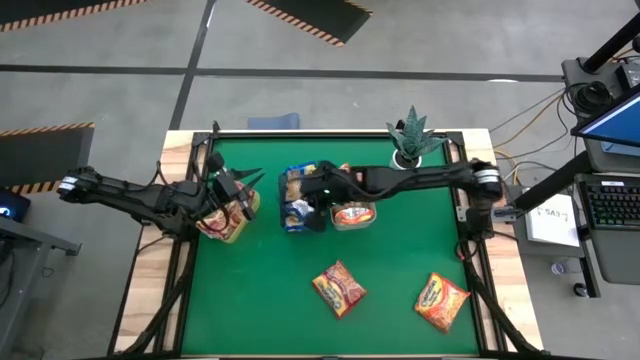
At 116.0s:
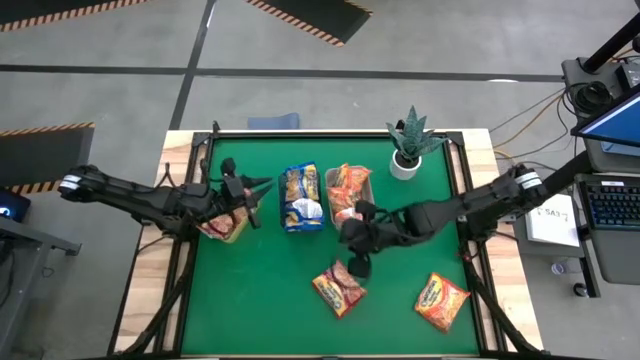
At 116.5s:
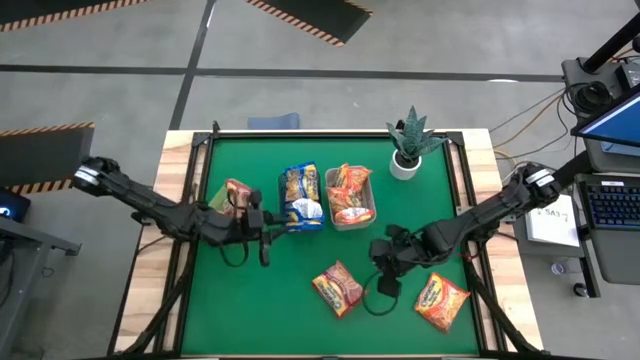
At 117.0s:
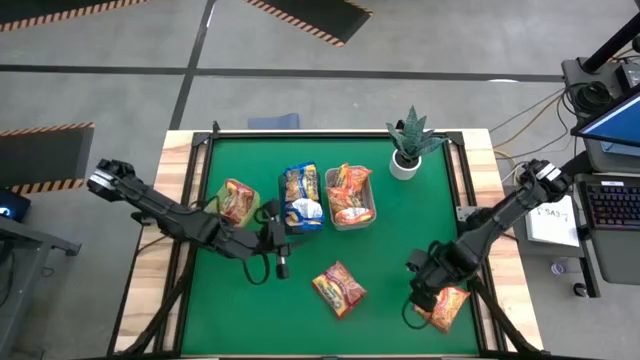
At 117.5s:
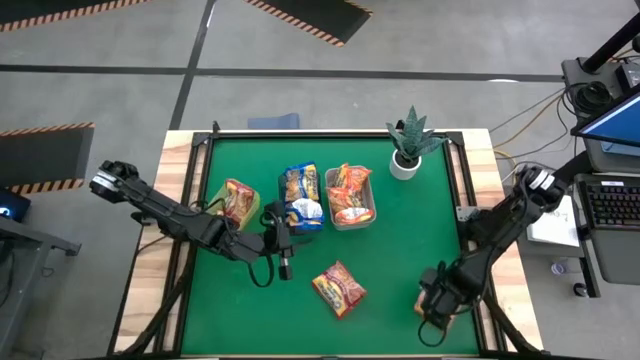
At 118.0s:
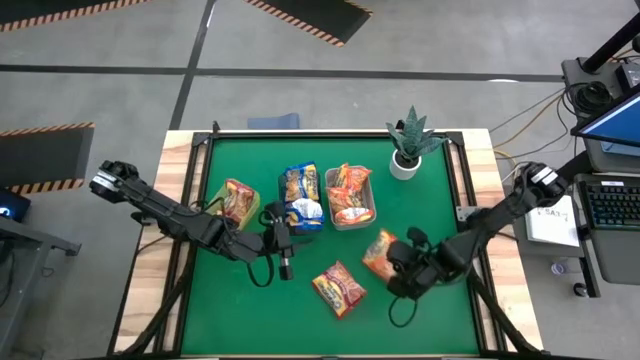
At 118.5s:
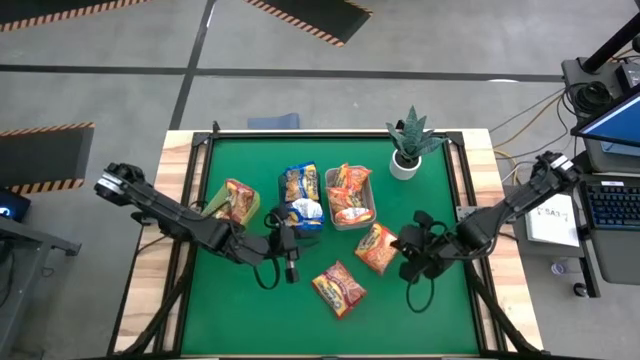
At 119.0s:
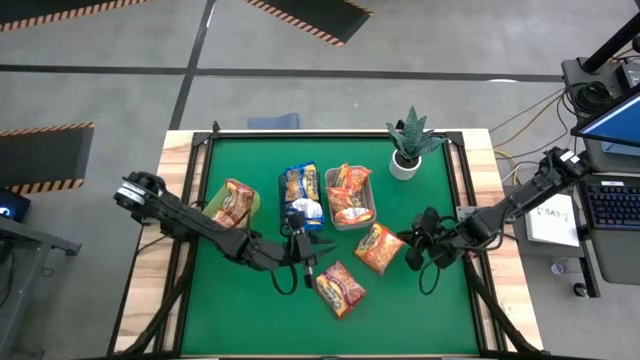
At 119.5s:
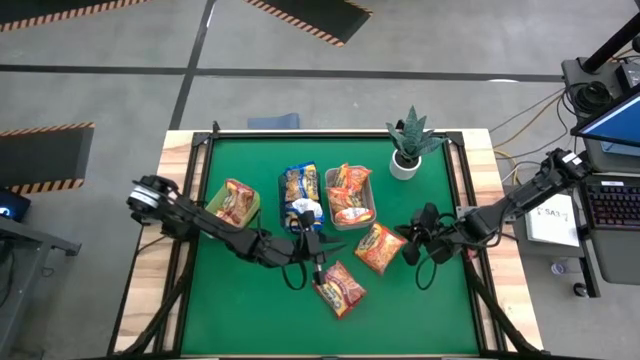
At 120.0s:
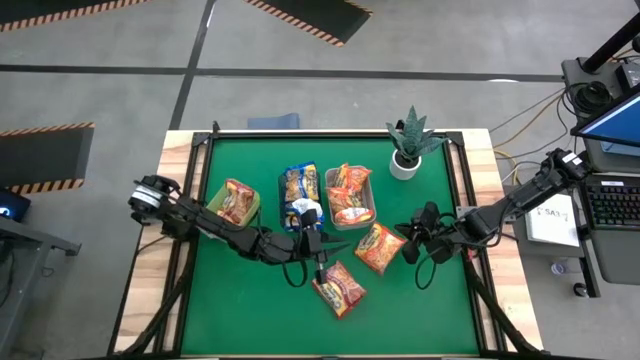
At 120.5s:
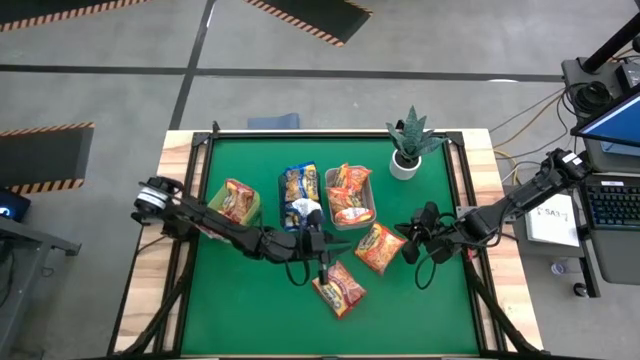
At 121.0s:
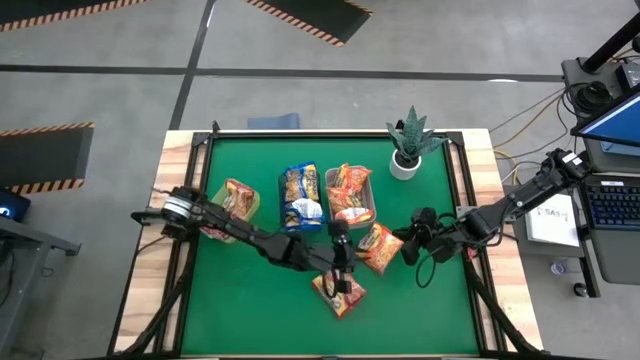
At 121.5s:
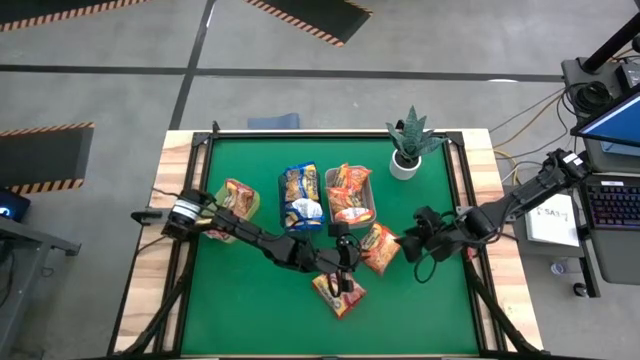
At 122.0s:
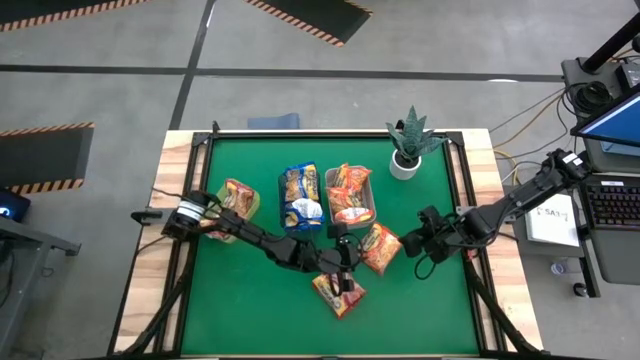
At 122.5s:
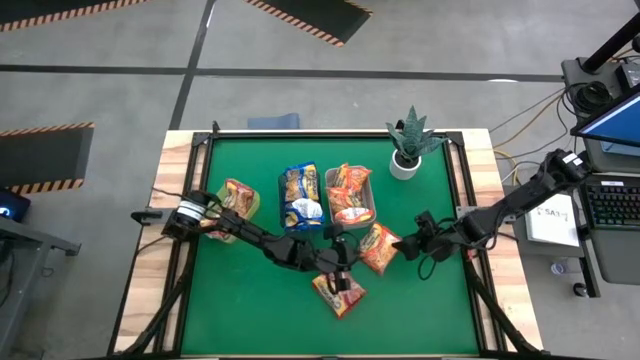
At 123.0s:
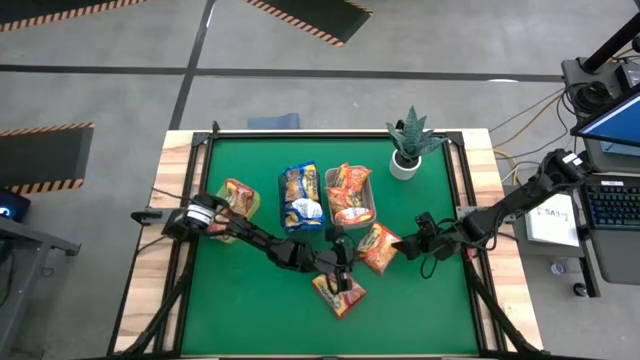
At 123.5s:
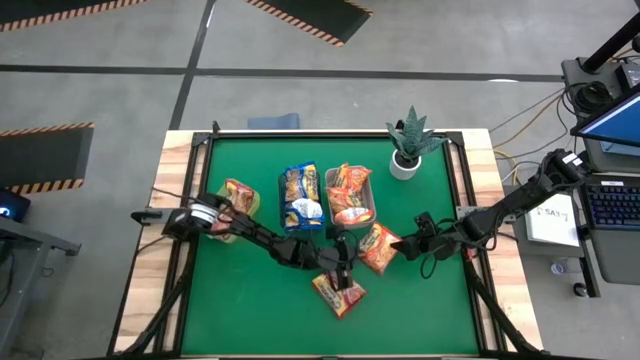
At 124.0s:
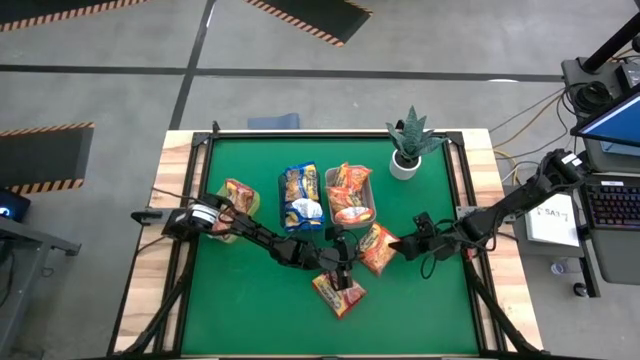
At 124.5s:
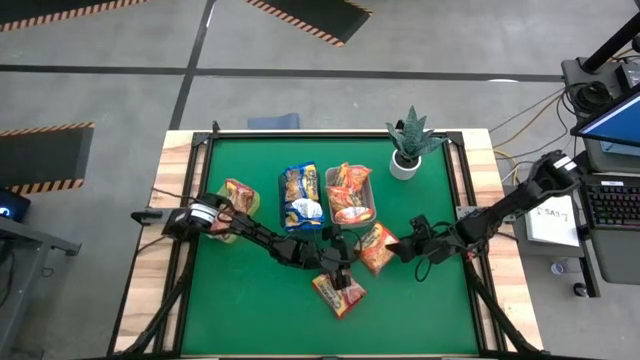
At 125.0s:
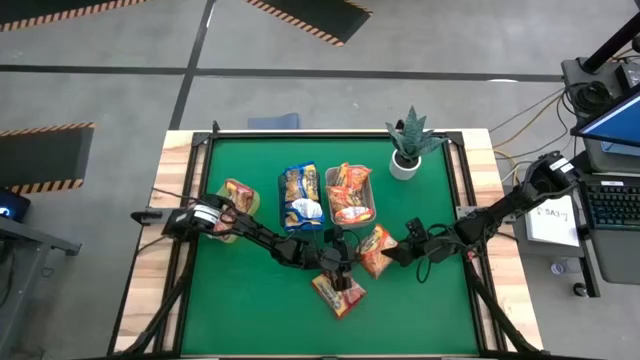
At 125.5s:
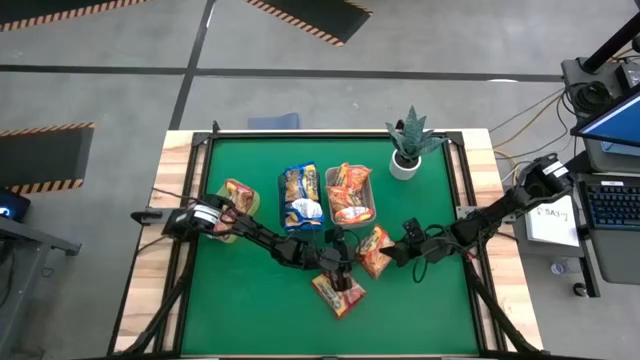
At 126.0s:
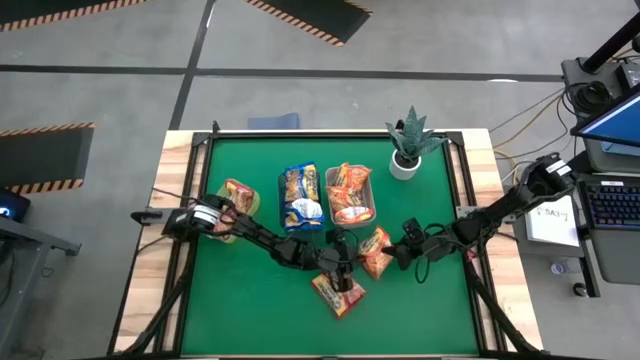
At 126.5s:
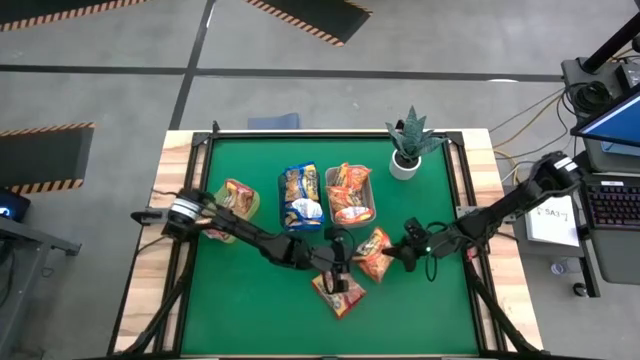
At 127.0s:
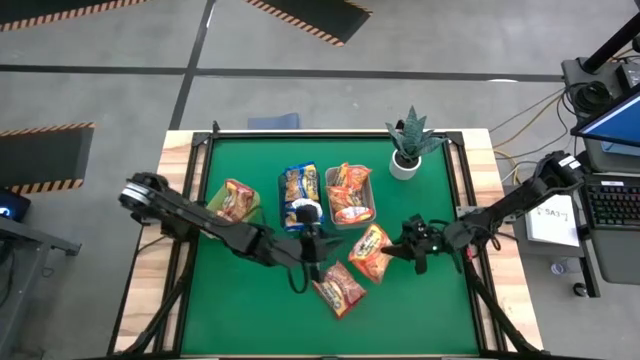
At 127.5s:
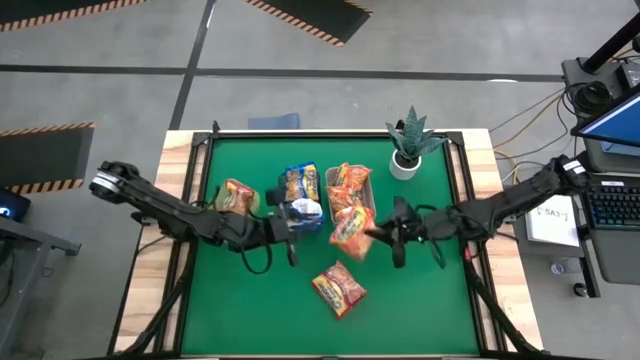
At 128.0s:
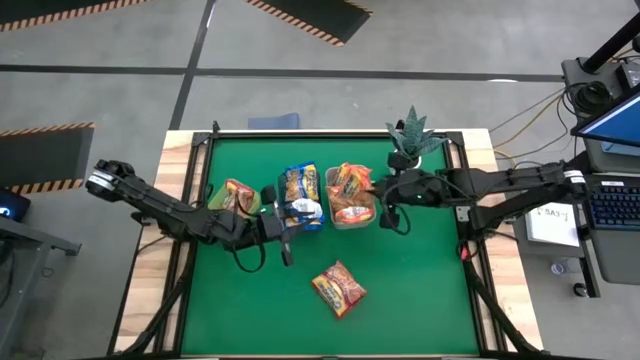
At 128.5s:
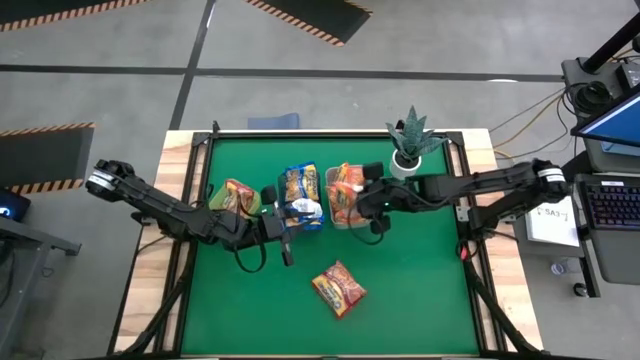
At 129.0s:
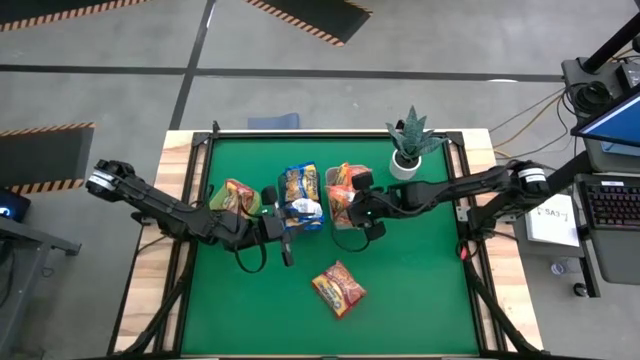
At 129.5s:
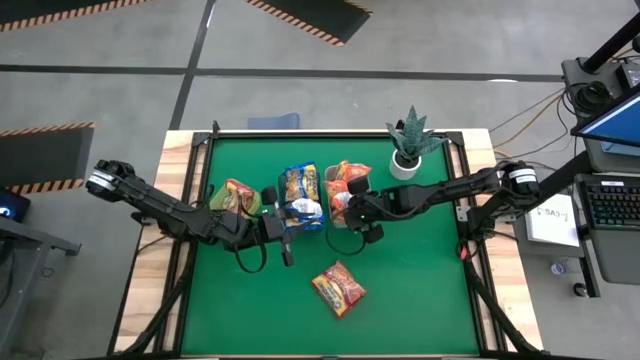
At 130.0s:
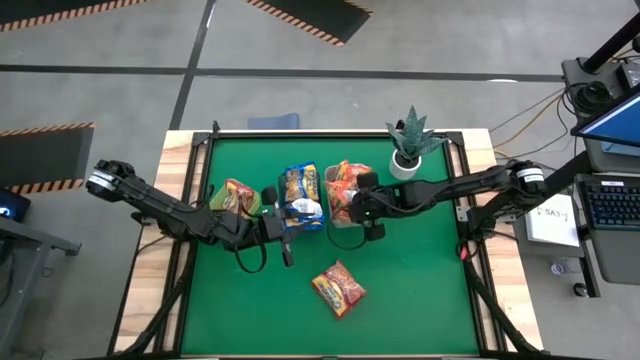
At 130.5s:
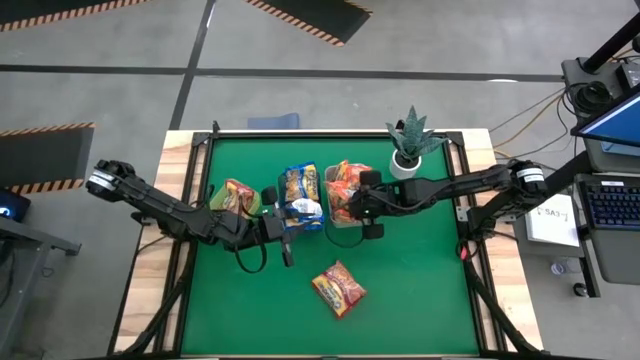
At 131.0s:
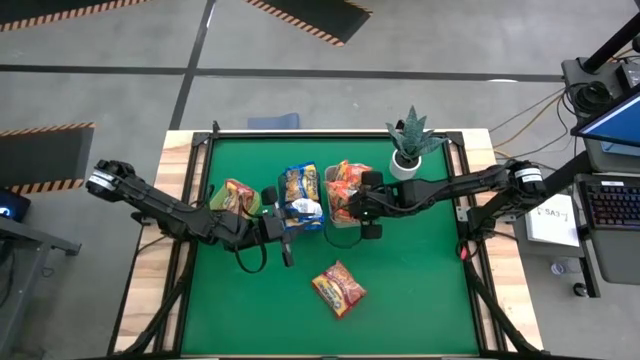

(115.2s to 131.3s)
Task: Sort Maruchan noodles
Put the orange noodle pack into the gray bin

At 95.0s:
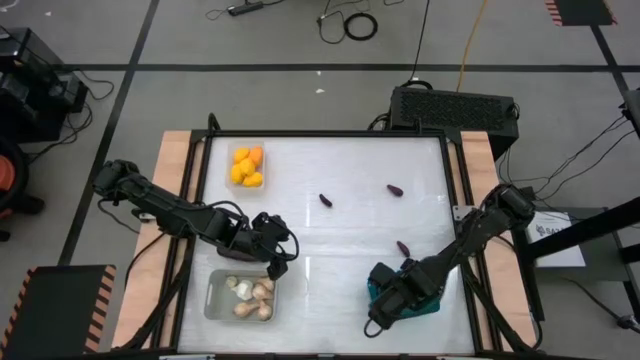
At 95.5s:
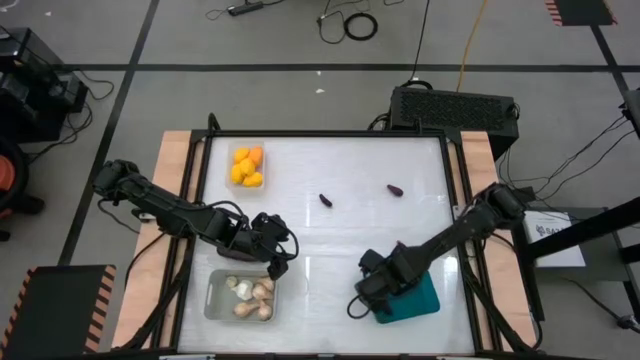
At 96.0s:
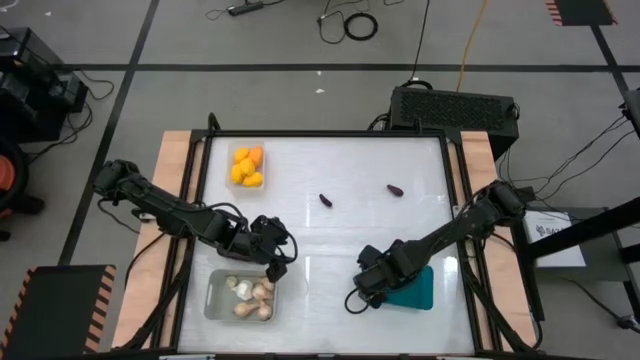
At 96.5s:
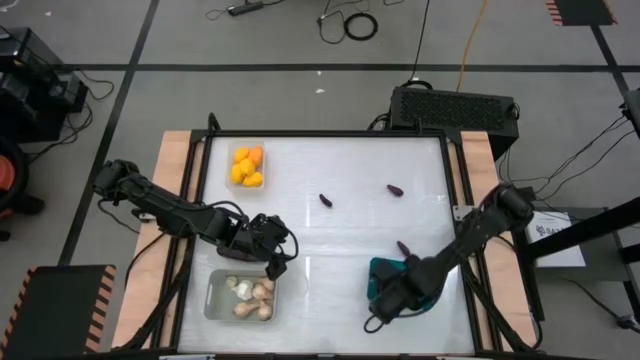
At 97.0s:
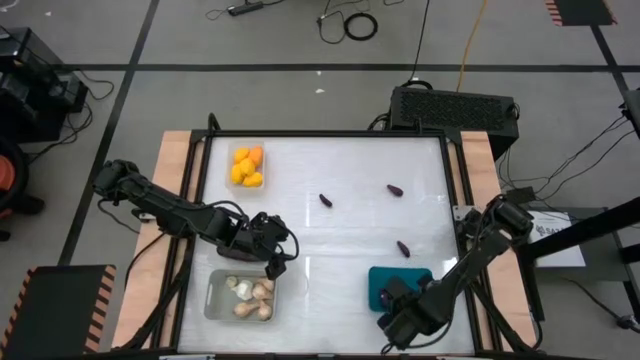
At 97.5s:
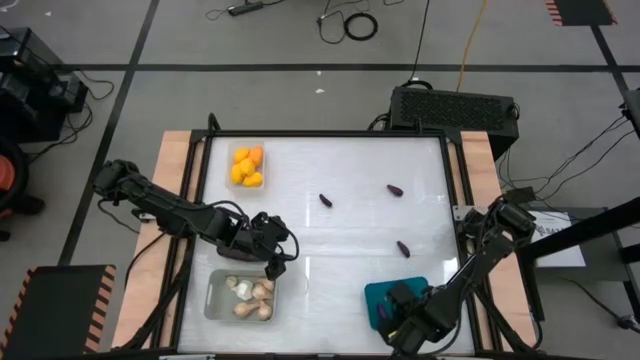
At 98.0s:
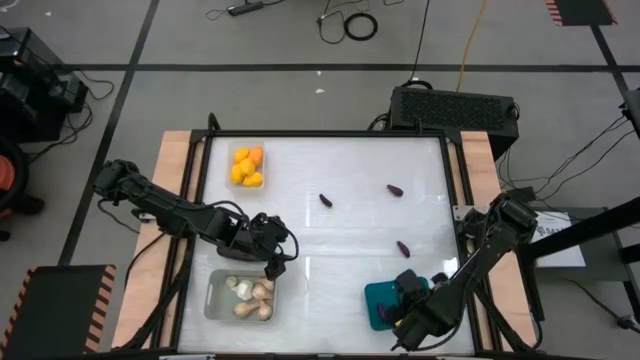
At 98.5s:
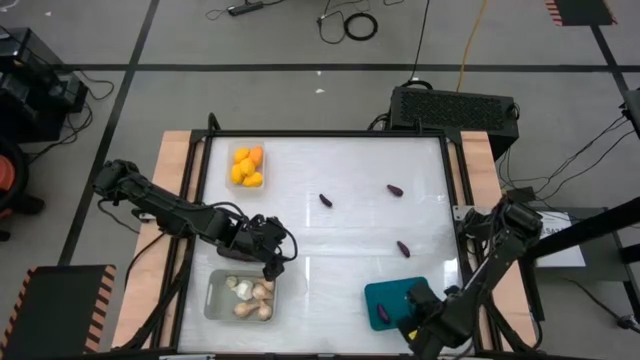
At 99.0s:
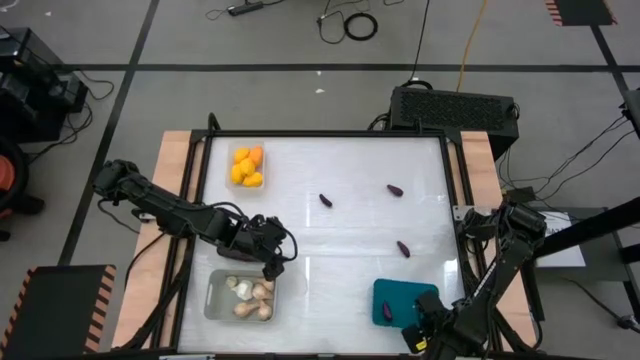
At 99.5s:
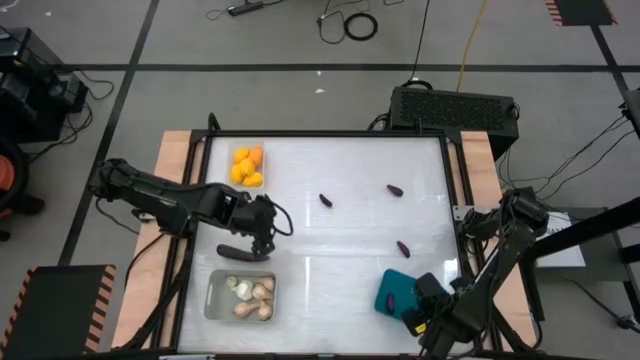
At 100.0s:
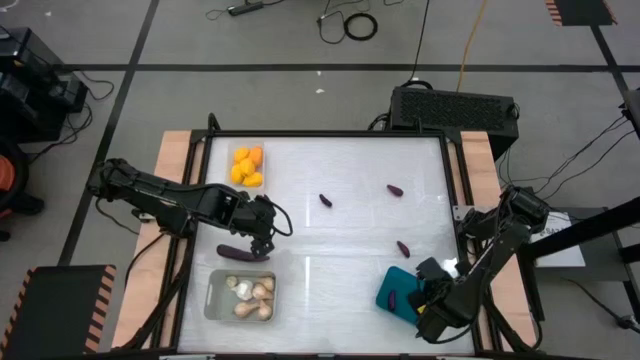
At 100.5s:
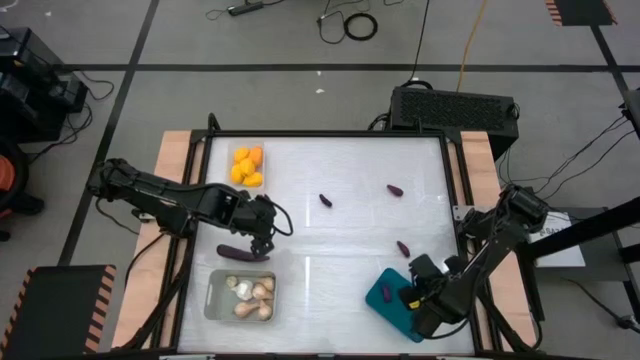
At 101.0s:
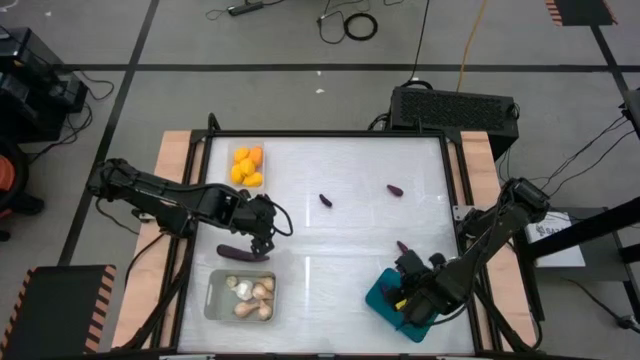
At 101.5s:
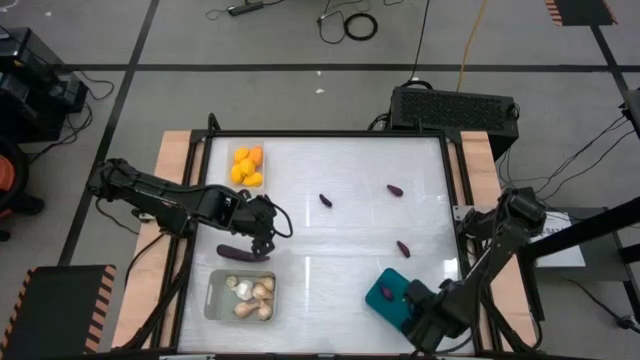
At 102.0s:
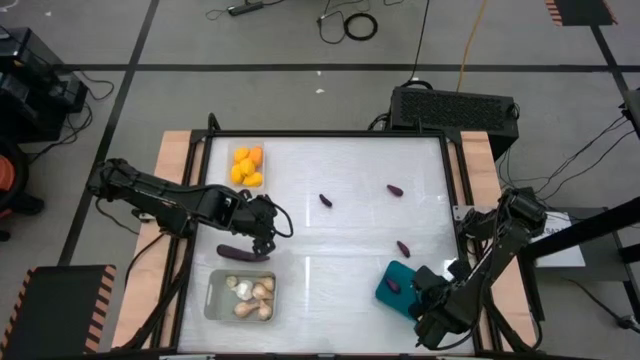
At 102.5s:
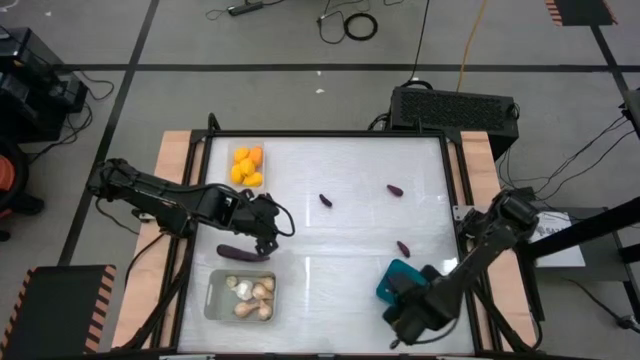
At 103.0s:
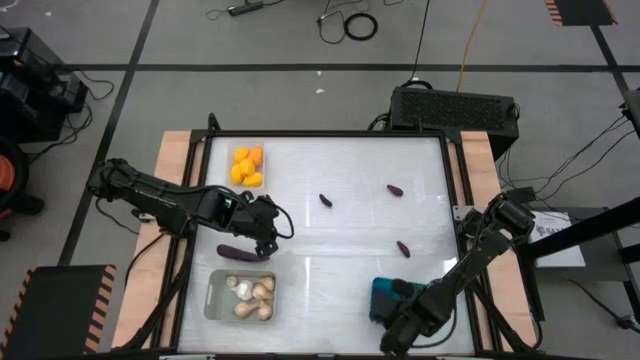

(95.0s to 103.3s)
Task: Sort produce into baskets
Adjust the blue bin on the table
